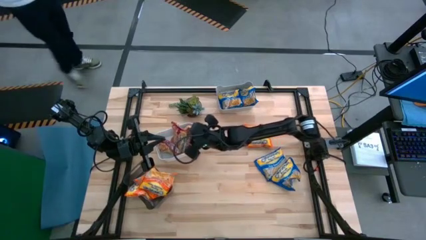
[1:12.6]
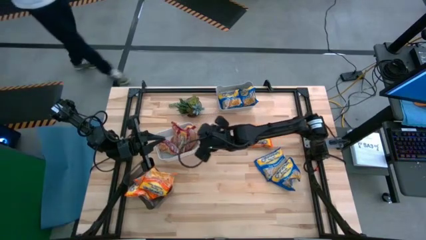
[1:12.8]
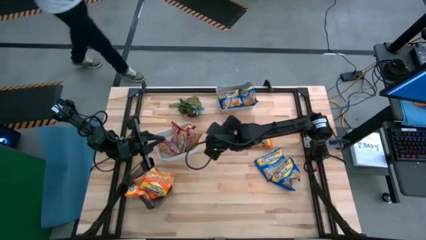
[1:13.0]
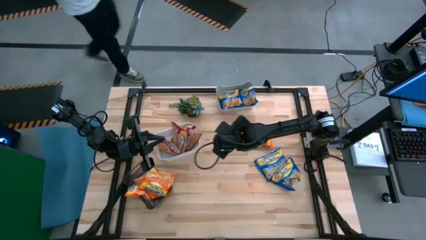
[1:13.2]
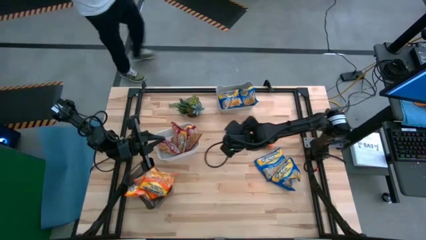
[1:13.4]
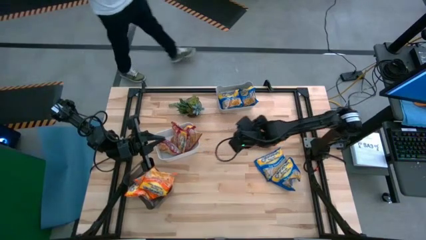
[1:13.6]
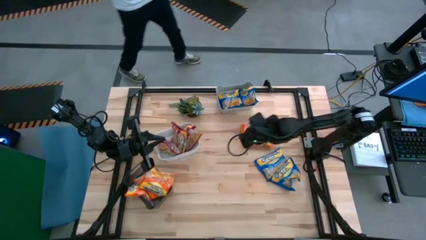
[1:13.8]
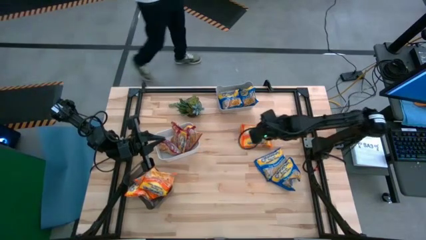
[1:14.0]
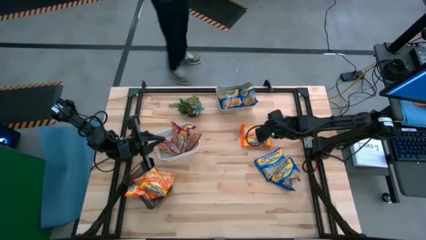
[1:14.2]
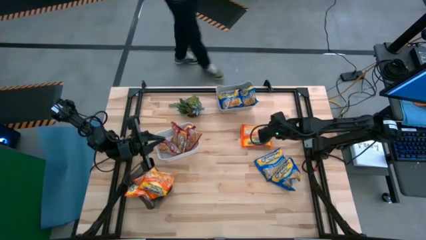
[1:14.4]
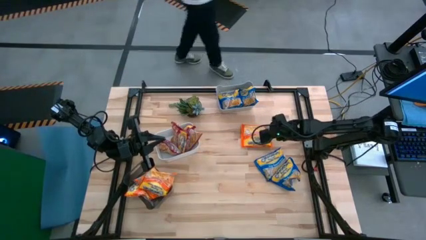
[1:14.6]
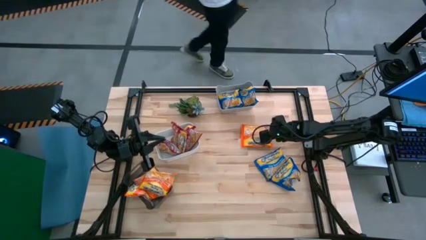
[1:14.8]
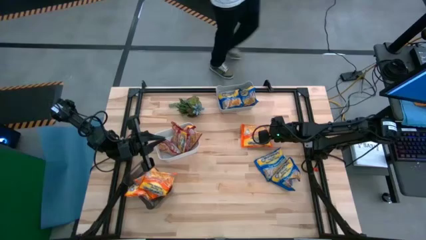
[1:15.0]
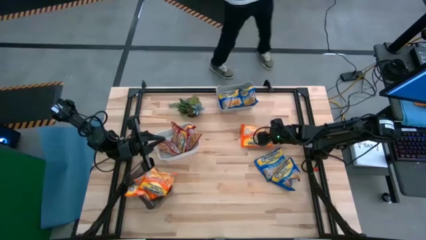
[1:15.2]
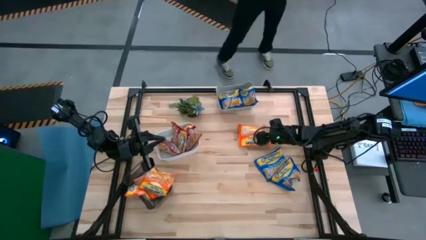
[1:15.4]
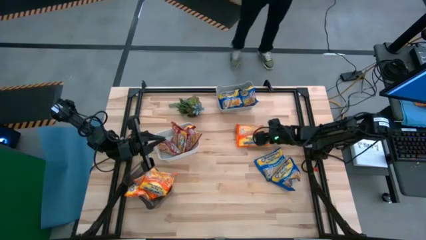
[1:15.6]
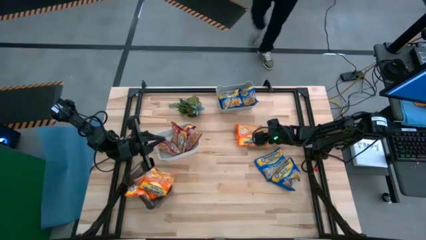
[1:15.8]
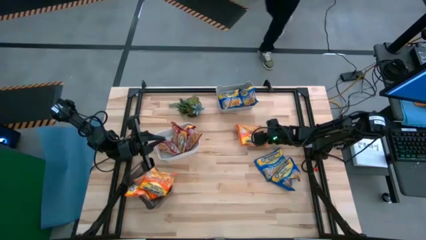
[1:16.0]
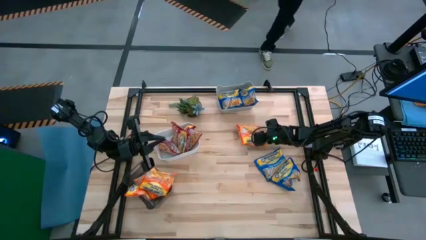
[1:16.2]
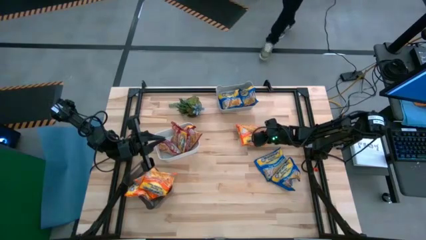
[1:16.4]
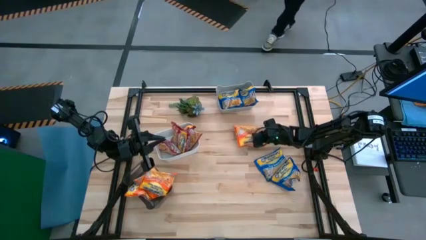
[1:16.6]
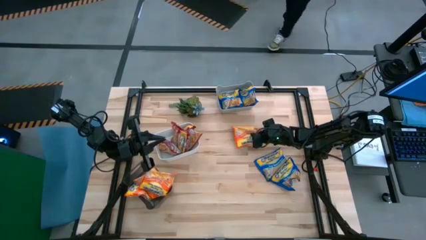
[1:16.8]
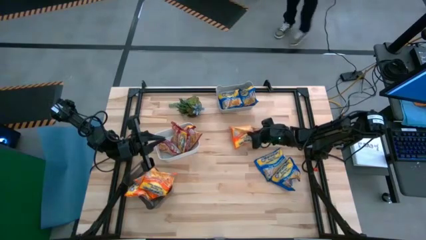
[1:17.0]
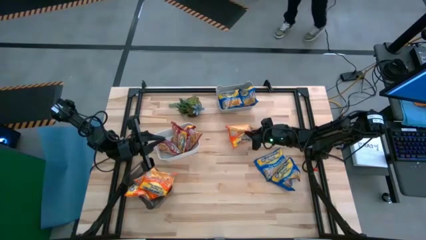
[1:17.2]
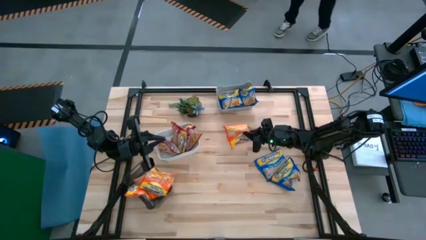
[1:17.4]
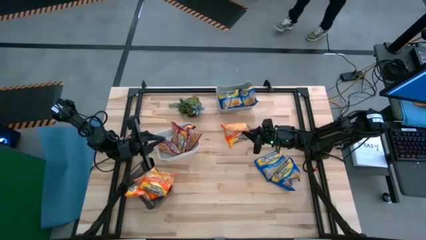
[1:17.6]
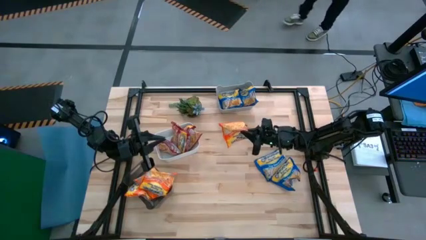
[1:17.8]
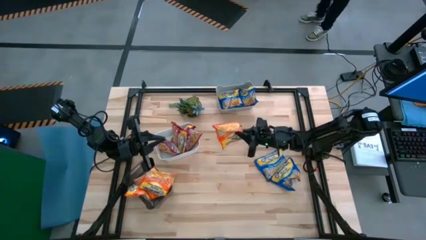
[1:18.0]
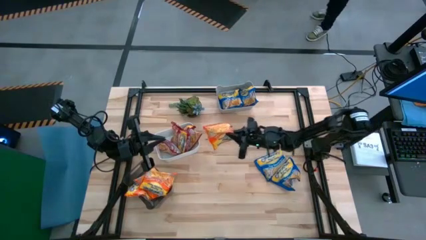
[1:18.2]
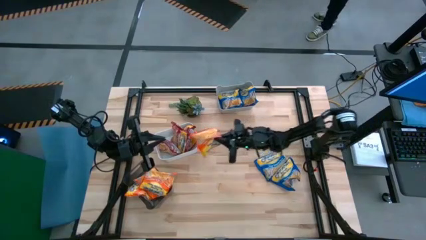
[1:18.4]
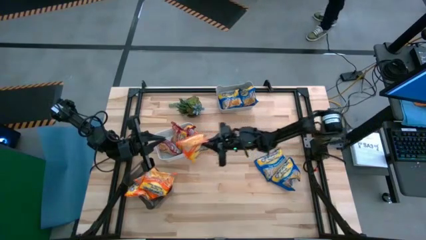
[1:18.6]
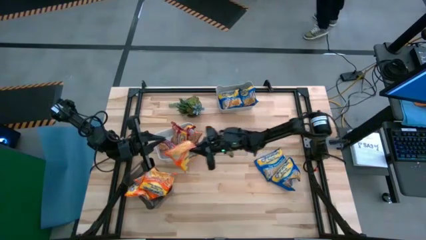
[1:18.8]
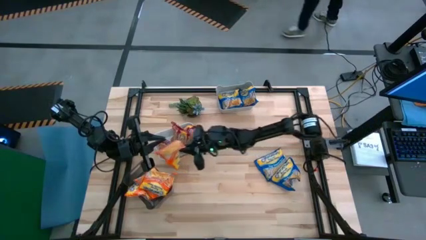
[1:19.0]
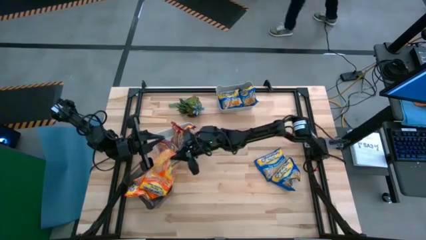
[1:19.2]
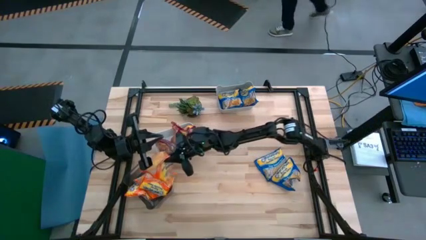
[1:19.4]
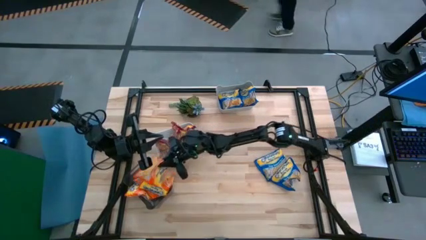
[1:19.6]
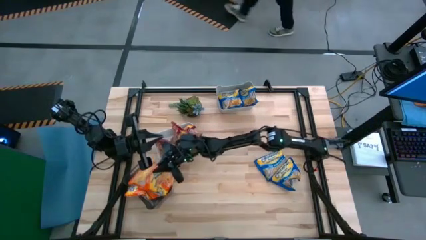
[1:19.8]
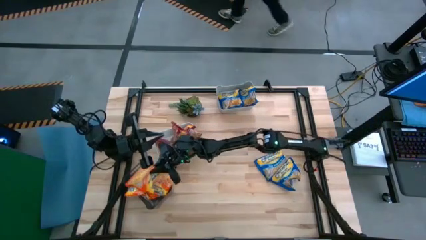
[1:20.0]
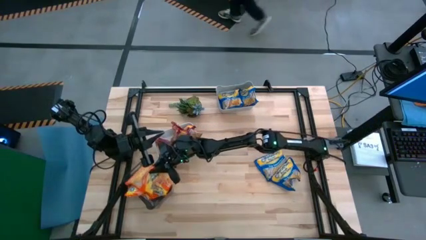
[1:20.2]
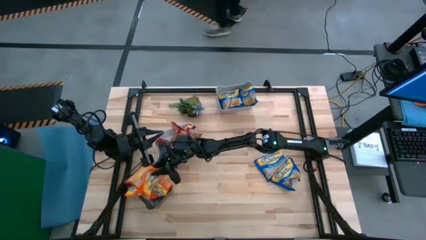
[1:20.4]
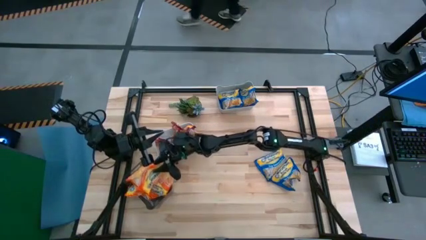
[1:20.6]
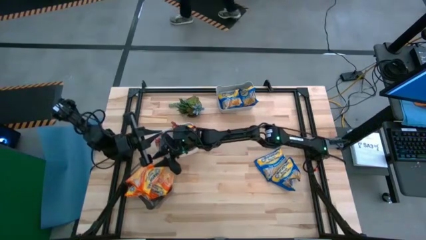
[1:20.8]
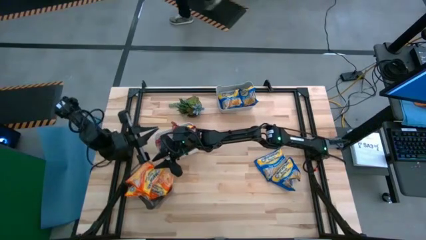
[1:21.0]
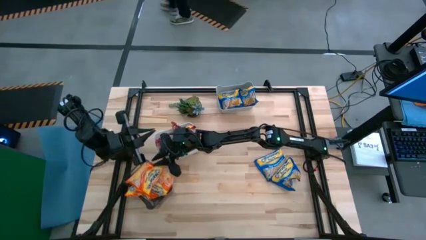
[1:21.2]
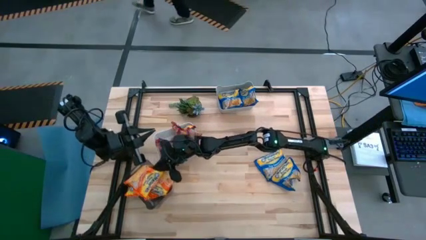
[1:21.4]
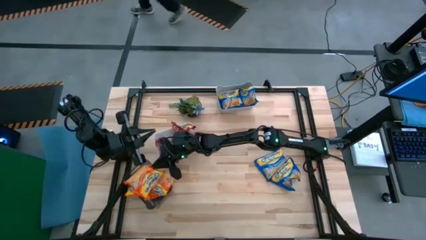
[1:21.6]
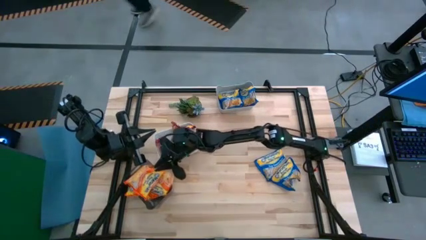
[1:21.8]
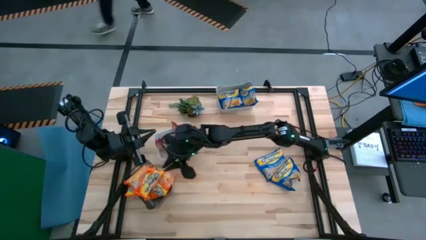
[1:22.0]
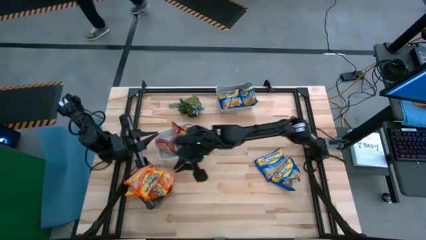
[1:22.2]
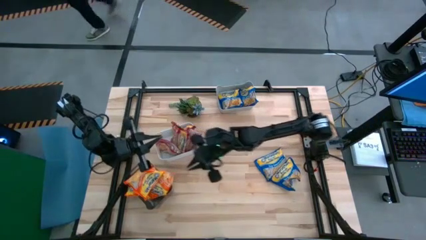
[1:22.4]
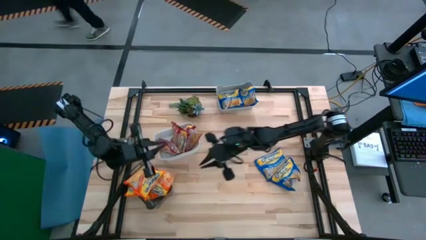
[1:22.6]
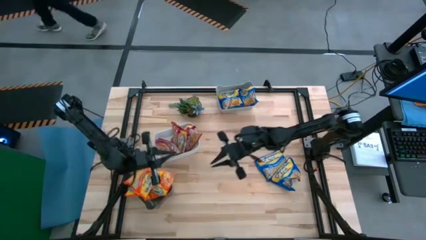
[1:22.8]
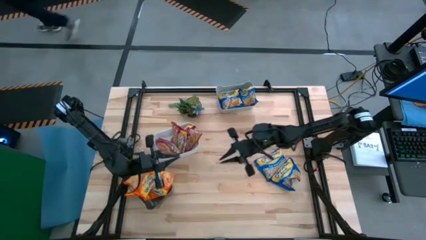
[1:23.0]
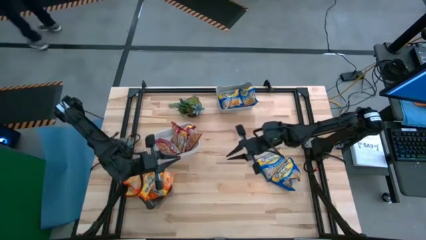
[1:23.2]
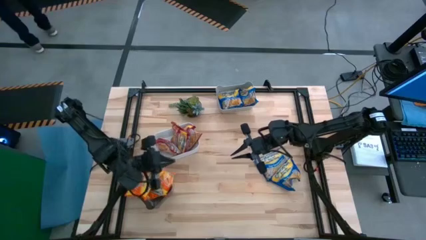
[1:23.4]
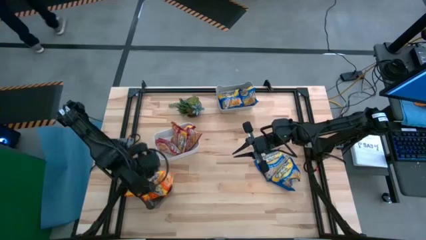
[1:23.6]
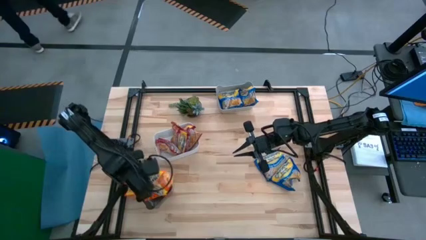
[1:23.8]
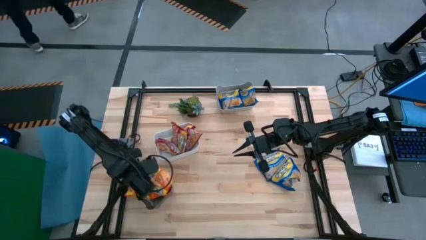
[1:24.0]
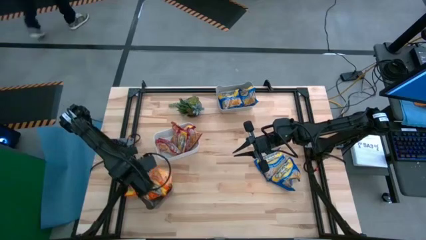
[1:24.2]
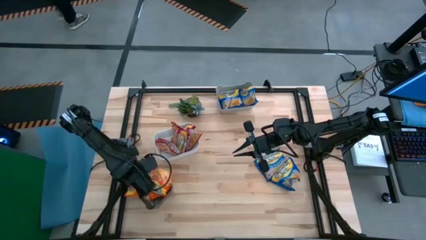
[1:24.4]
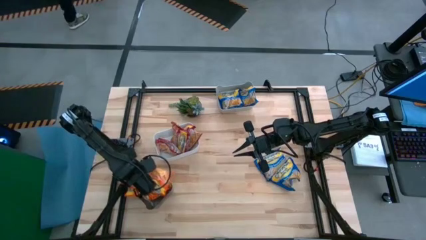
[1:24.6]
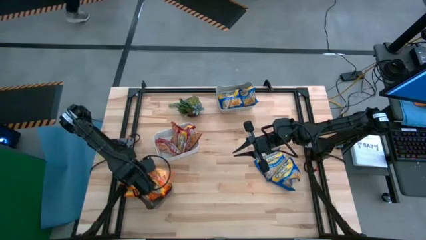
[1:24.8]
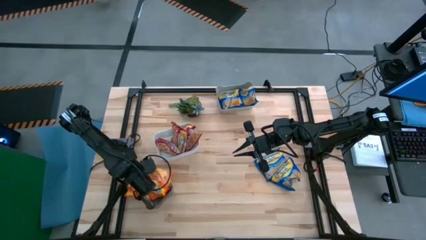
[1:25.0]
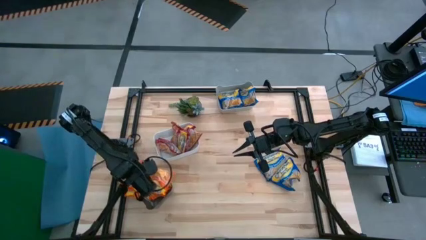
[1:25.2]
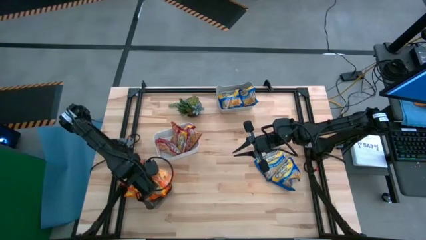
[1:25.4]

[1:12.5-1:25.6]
Task: Sort Maruchan noodles
Put the orange noodle pack into the black bin

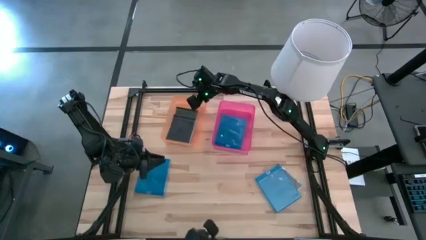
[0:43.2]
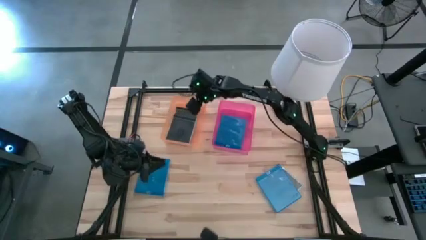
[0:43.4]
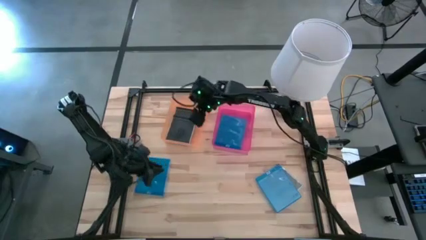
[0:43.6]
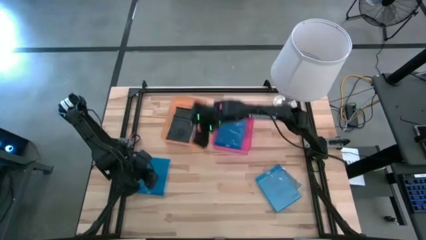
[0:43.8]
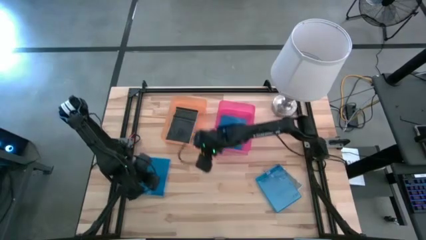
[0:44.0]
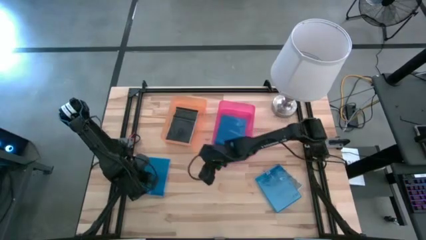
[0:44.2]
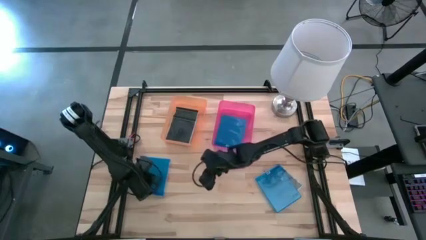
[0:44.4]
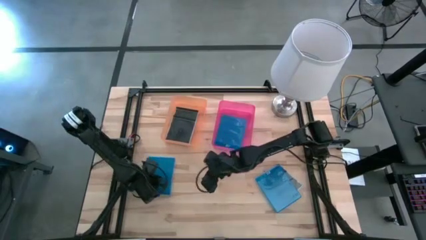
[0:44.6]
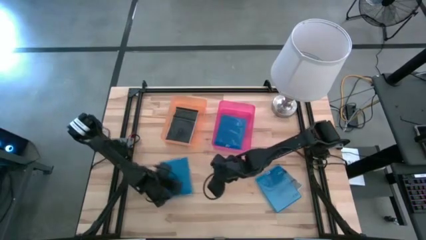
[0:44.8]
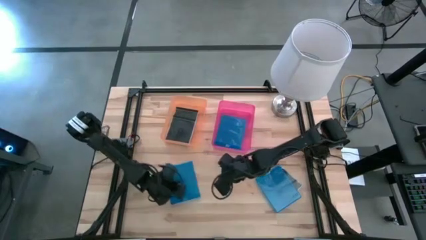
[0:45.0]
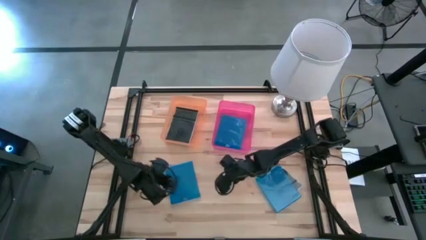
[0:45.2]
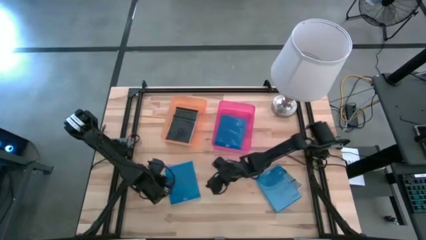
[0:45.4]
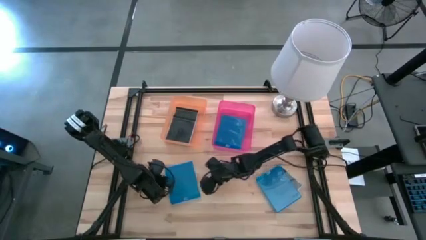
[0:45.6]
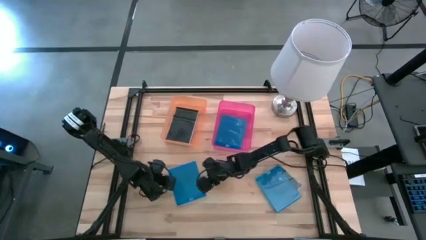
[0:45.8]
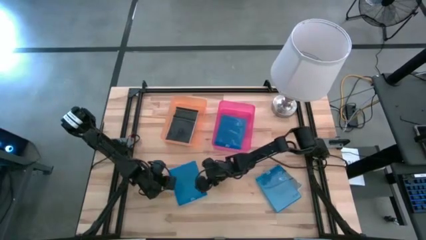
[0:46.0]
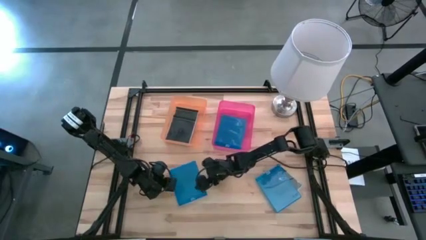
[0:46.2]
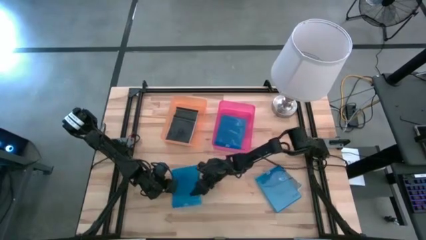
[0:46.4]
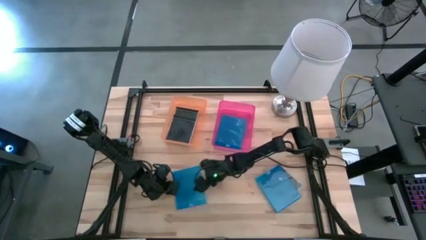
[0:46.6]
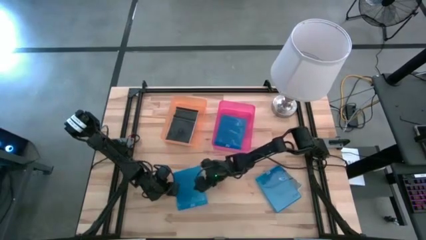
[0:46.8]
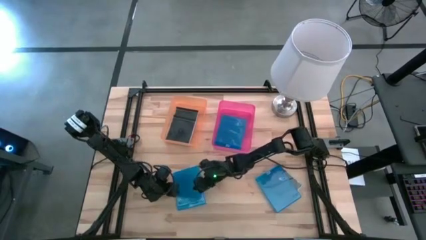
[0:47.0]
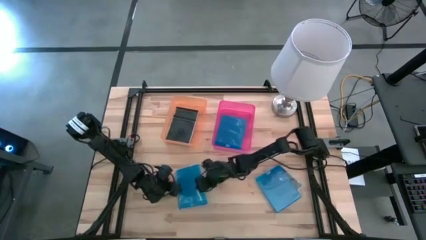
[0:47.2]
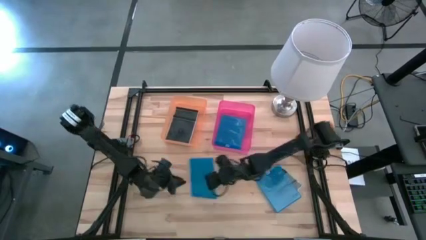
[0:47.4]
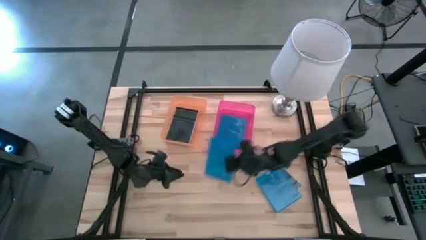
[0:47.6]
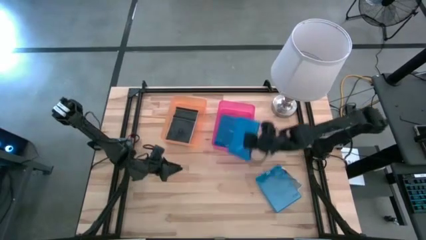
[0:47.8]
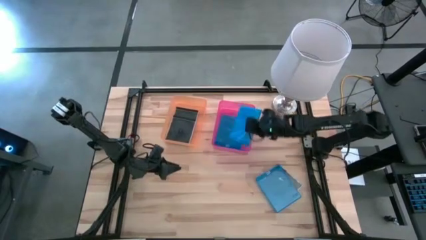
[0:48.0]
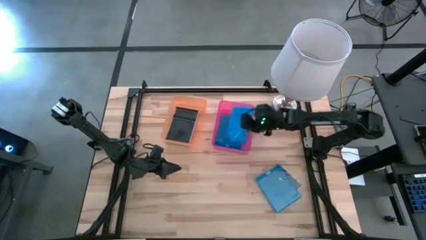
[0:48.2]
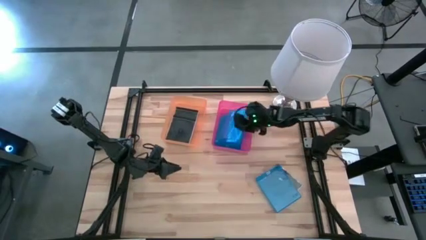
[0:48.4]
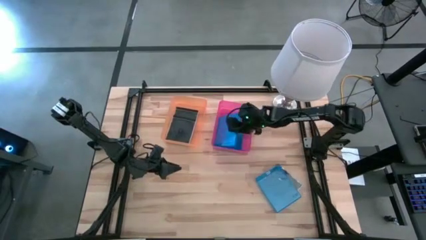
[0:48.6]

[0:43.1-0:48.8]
Task: Pick & place jewel cases by type
Put the left blue CD case into the pink bin
